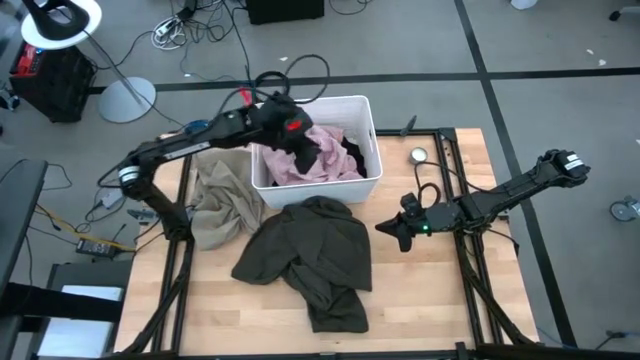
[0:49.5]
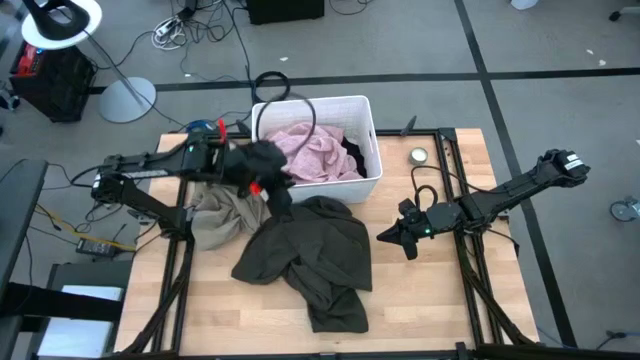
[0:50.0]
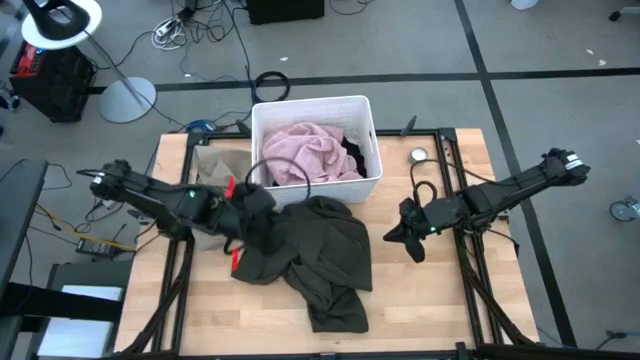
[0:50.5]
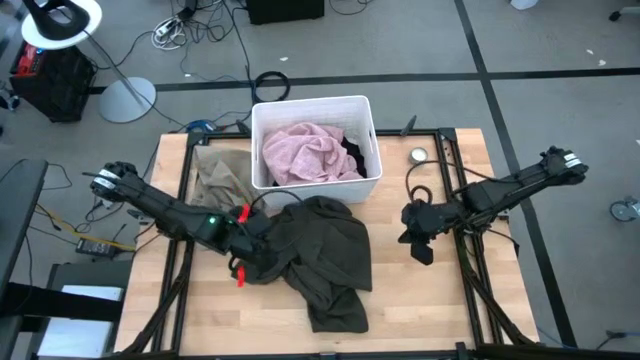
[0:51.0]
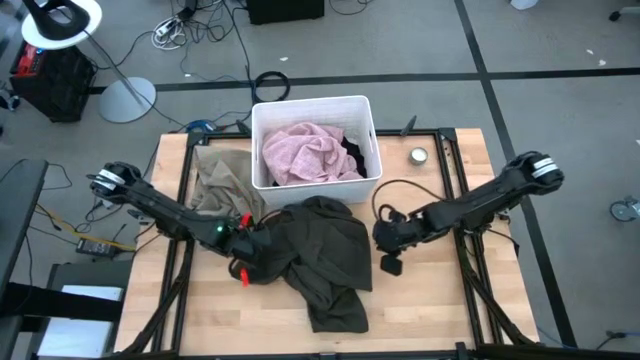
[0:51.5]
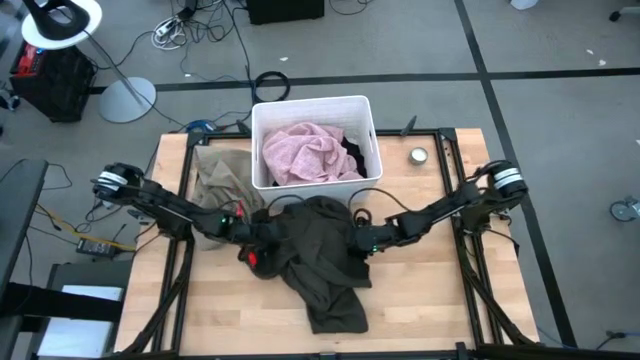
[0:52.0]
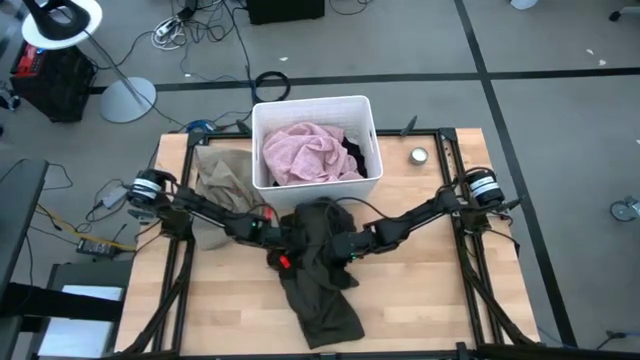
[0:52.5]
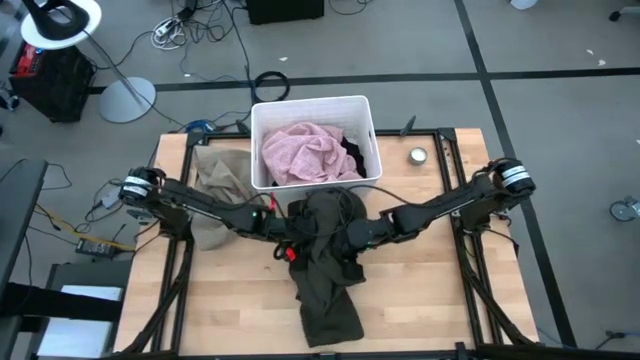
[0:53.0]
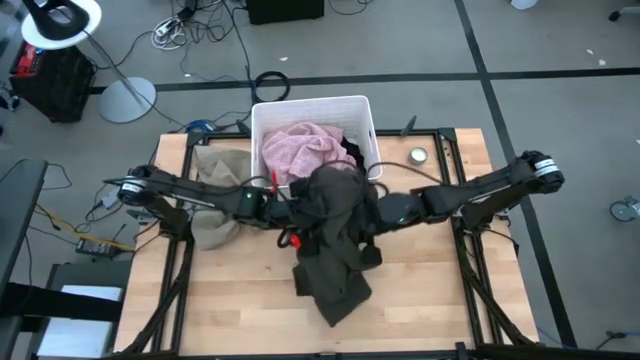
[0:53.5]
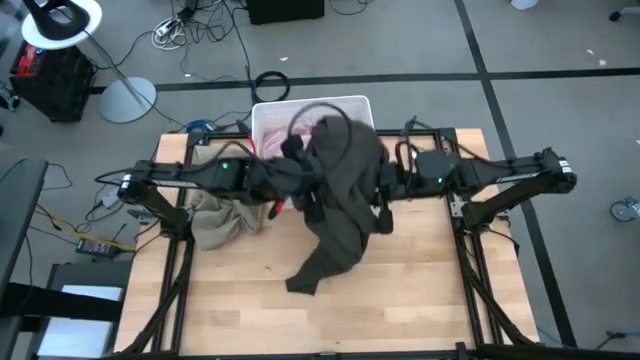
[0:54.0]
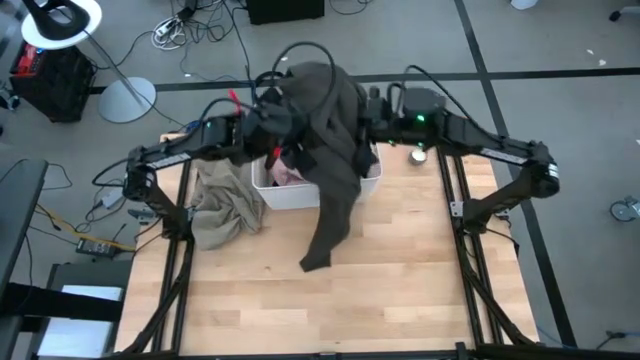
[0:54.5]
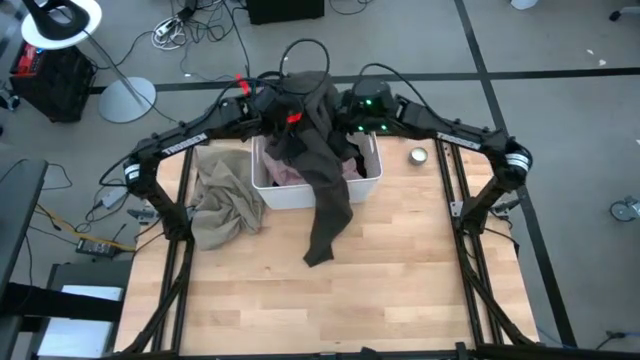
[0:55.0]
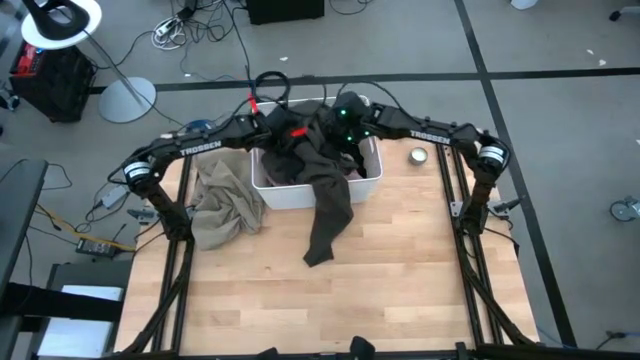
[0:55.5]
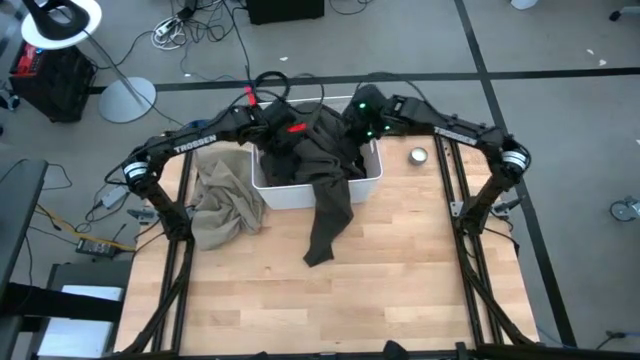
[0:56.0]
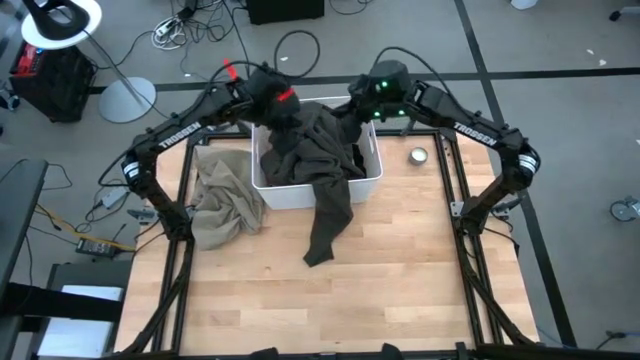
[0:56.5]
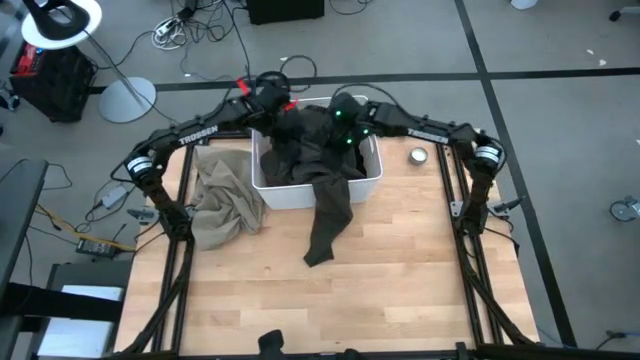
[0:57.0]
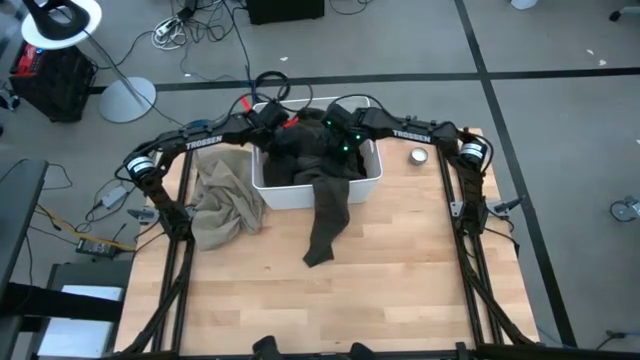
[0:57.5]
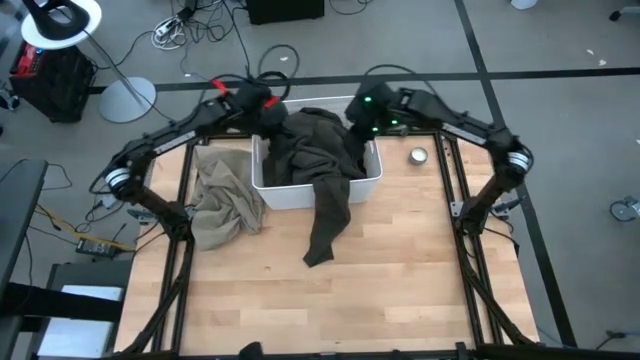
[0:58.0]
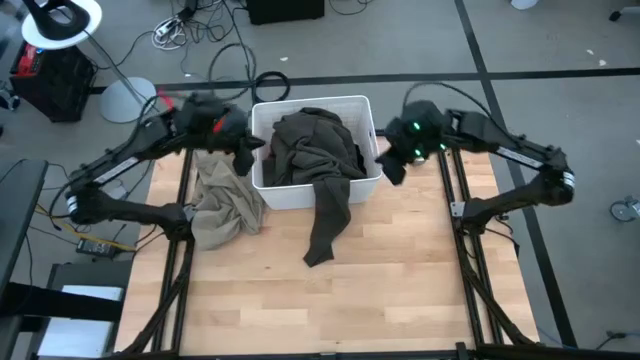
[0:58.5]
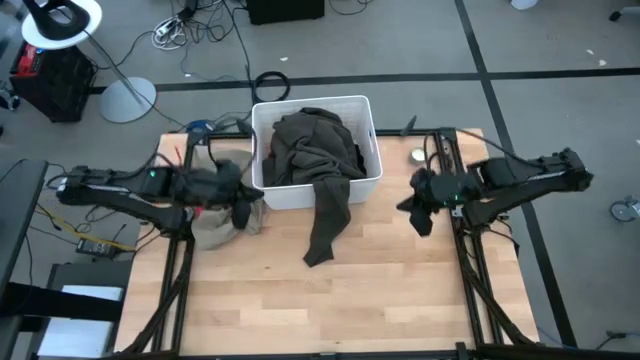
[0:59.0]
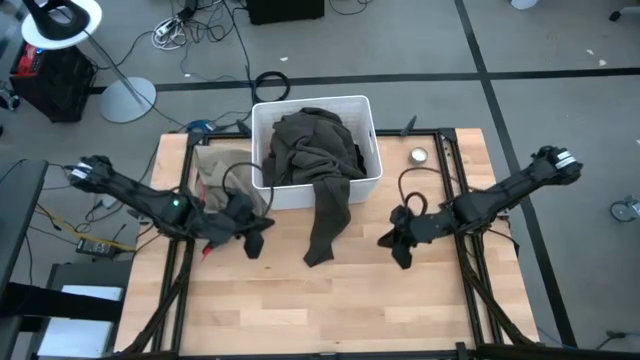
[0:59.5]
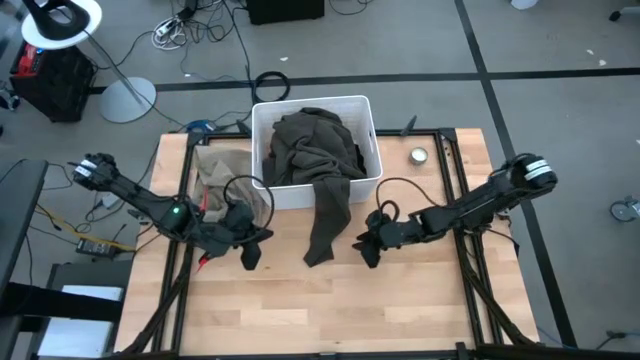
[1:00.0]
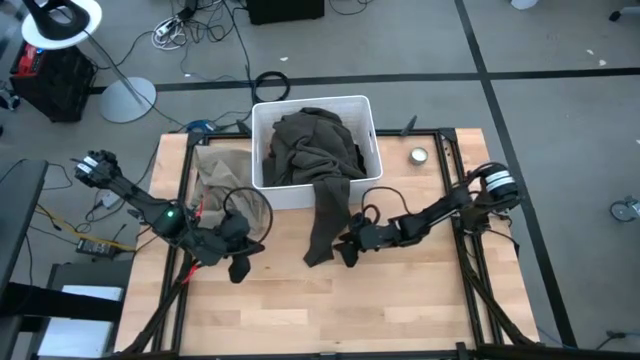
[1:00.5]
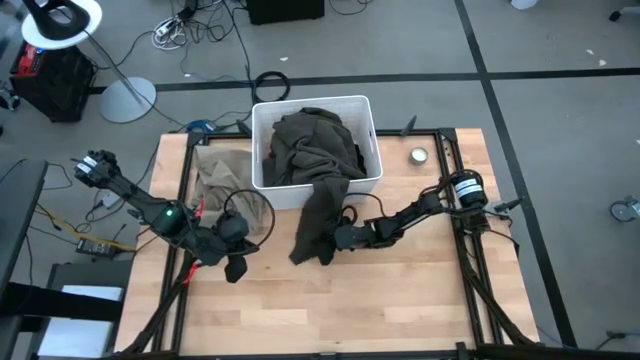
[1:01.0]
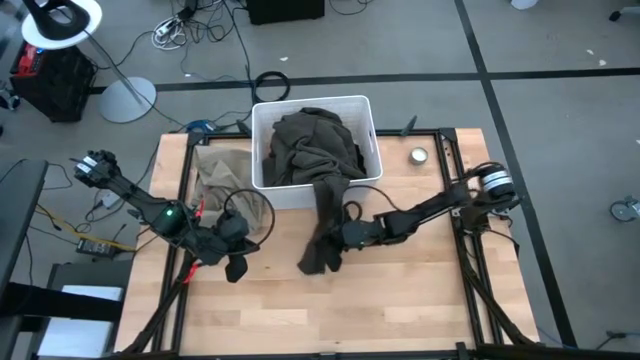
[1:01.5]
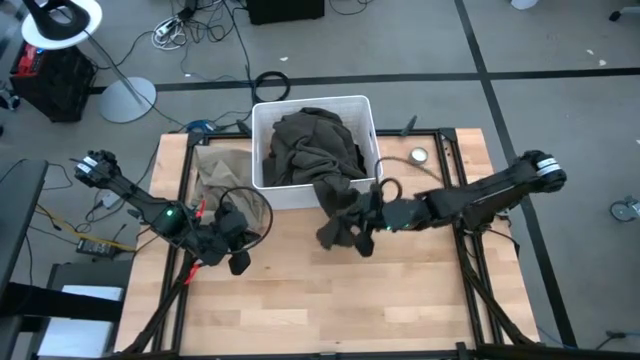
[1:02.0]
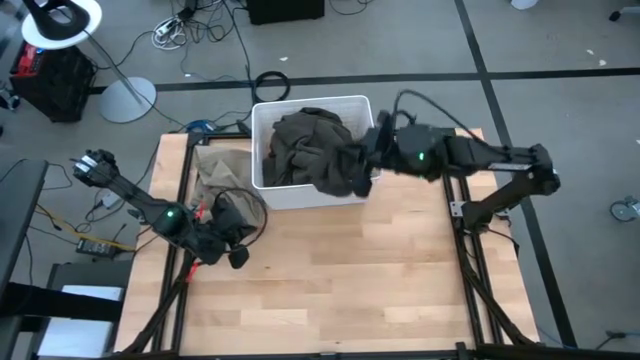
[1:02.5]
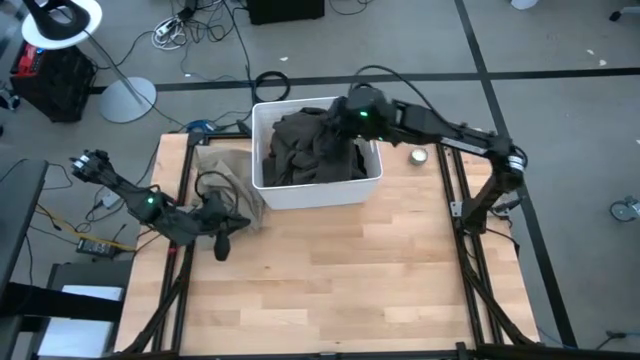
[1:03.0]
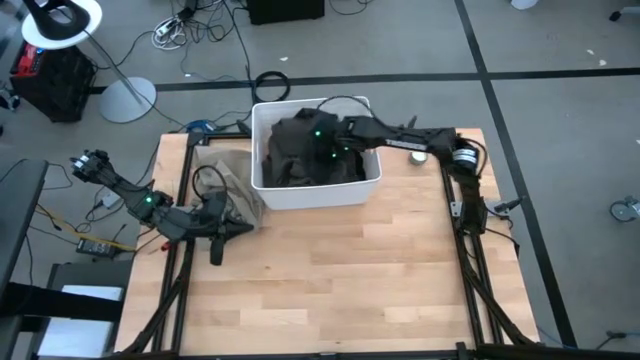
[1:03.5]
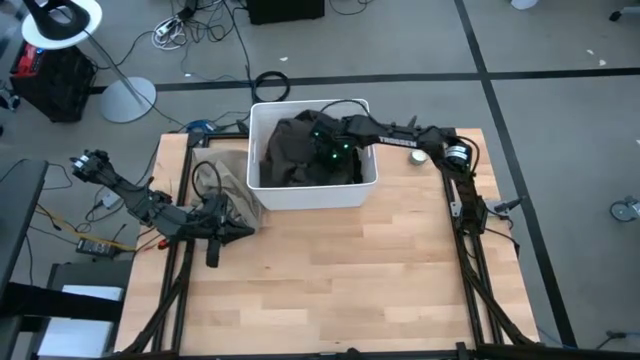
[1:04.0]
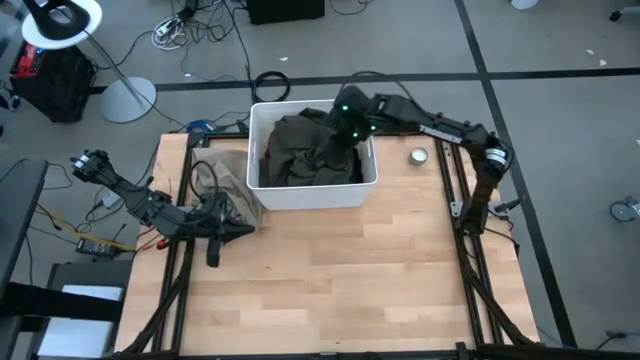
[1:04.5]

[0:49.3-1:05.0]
Task: Sort clothes
Put the black sweatshirt into the white laundry bin

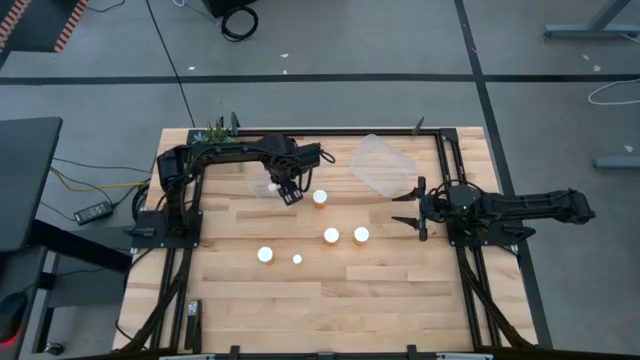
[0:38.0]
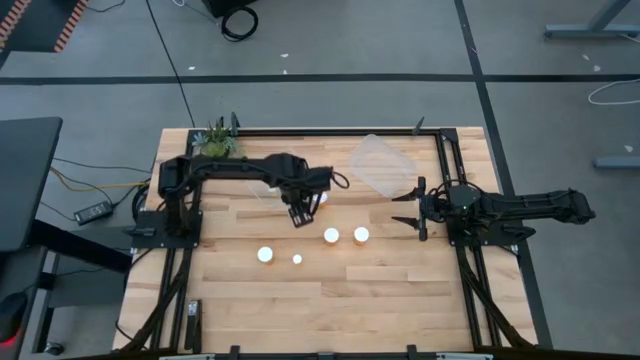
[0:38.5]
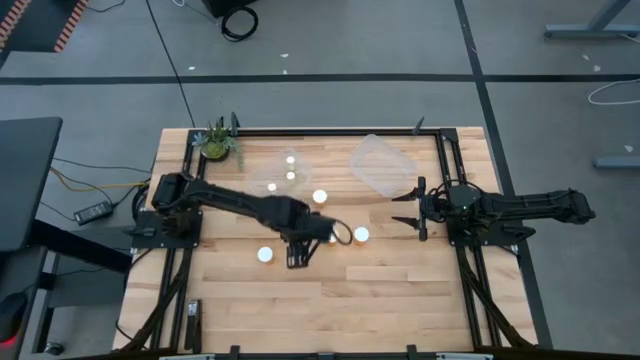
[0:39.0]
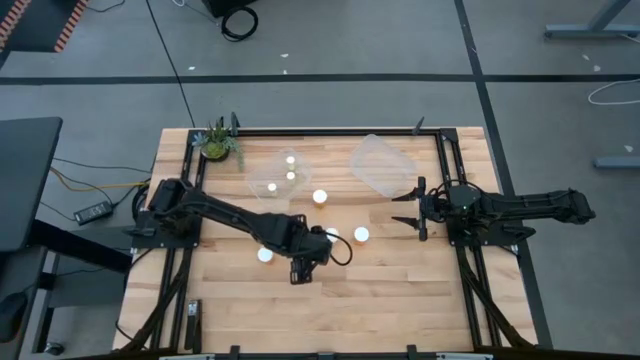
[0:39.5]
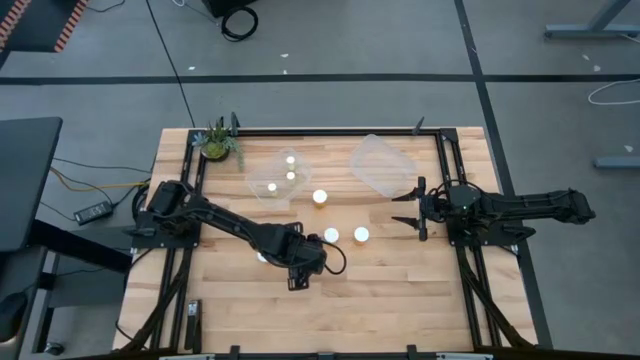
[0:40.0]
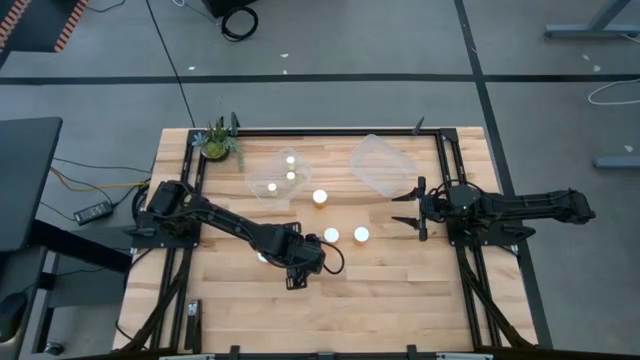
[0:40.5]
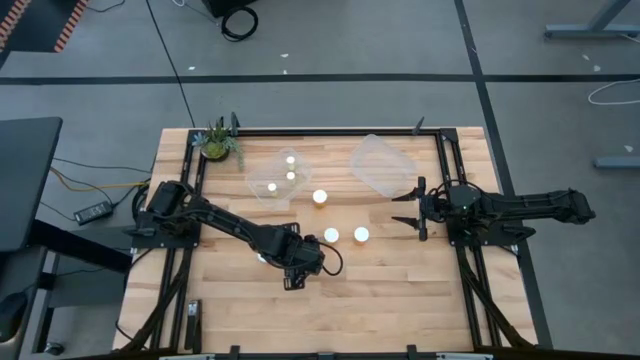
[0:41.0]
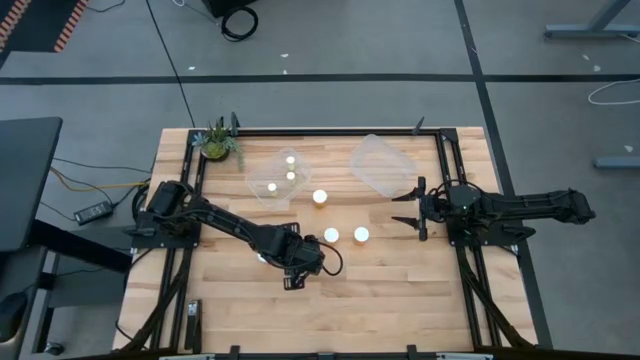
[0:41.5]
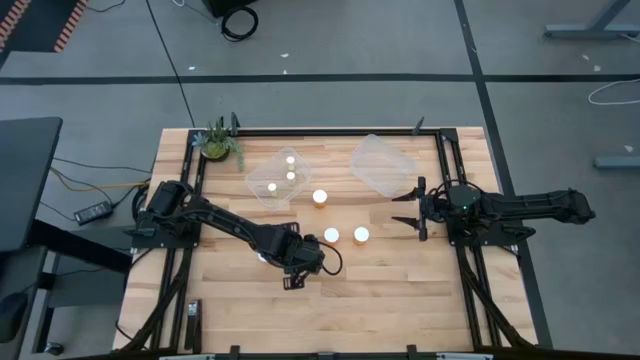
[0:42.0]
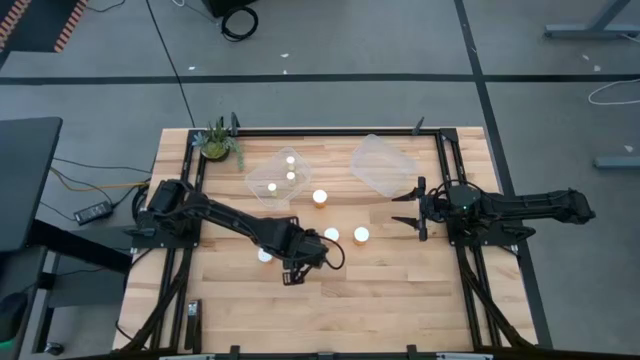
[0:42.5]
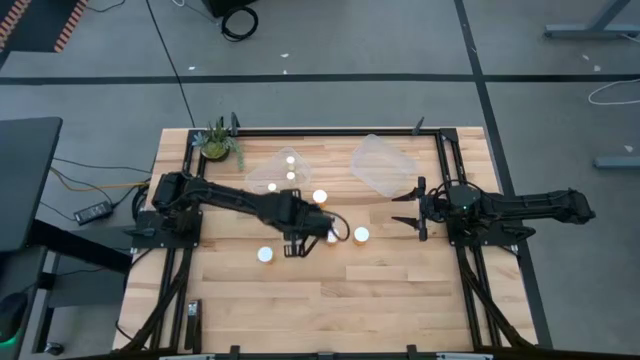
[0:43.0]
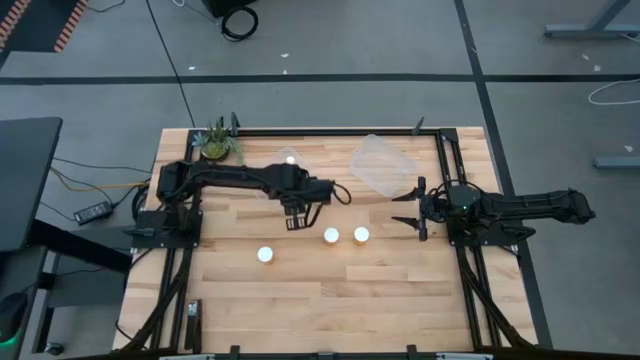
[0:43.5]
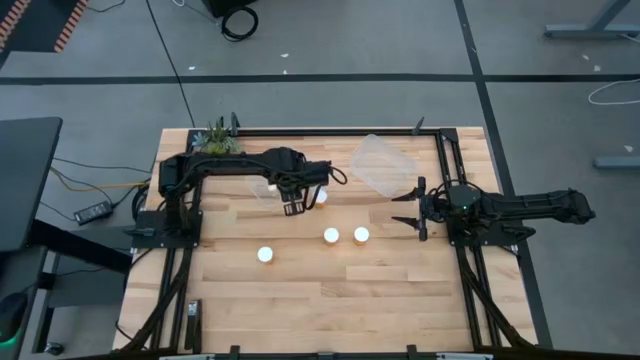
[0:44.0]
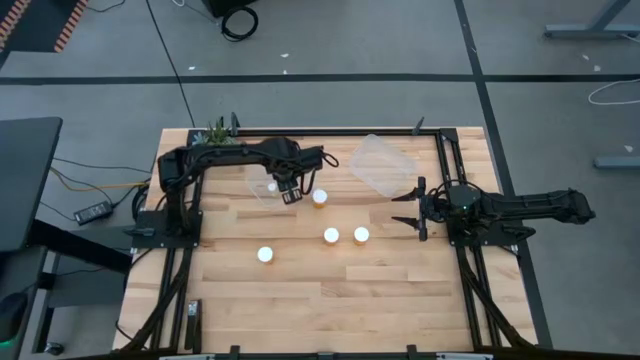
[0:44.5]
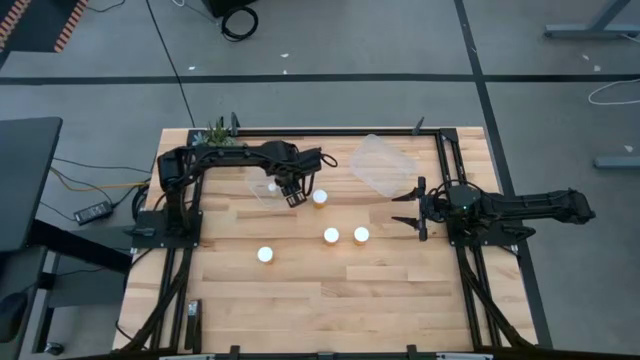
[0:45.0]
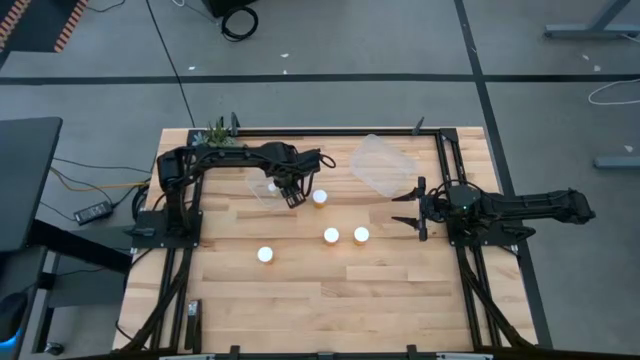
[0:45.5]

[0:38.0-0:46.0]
Task: Pick and place medicine bottles into bin by pill shape (circle, oval)
Put the small orange pill bottle into the left transparent bin
